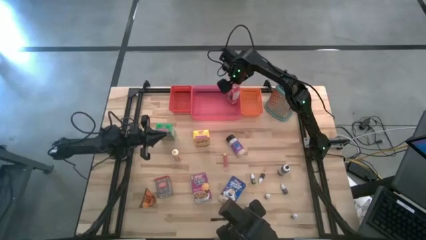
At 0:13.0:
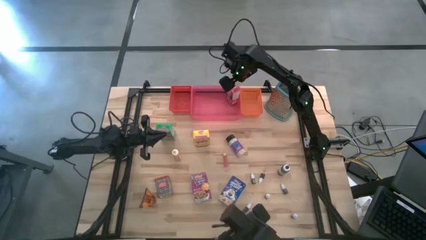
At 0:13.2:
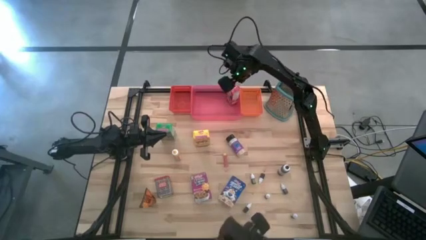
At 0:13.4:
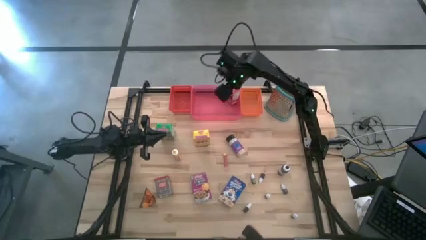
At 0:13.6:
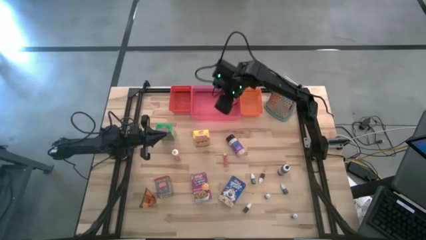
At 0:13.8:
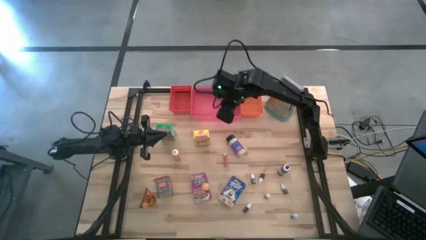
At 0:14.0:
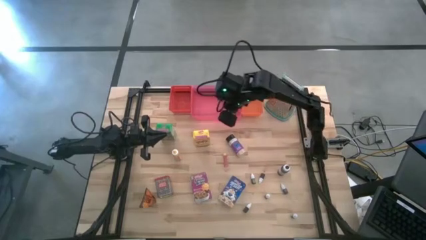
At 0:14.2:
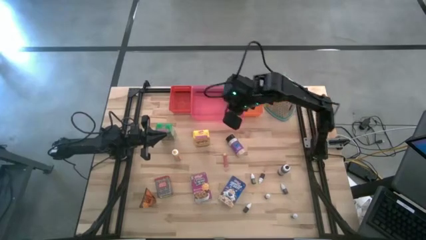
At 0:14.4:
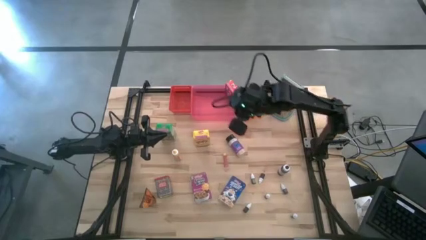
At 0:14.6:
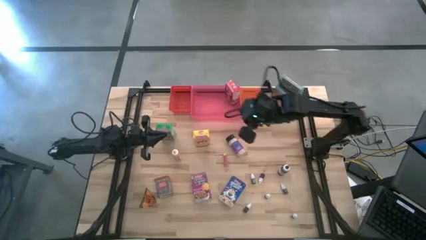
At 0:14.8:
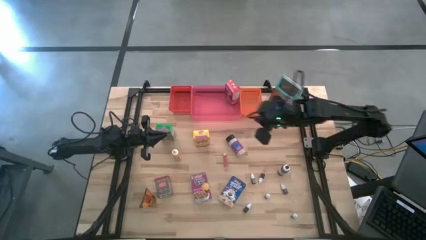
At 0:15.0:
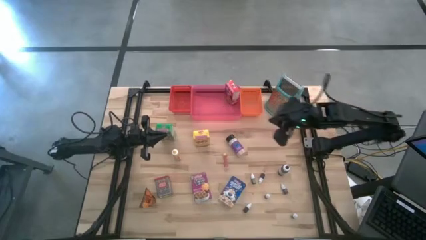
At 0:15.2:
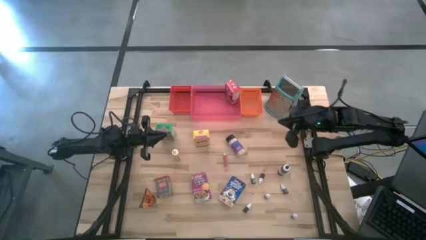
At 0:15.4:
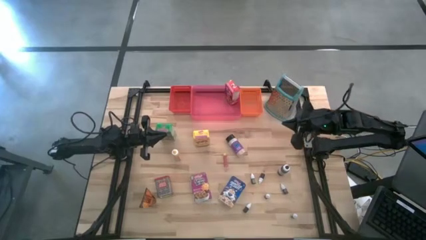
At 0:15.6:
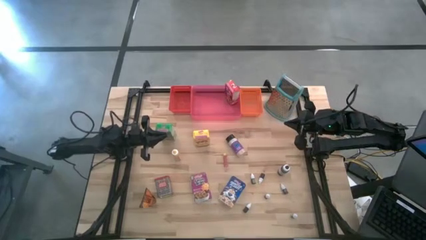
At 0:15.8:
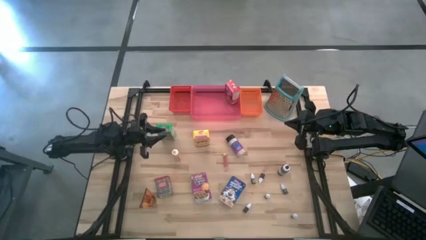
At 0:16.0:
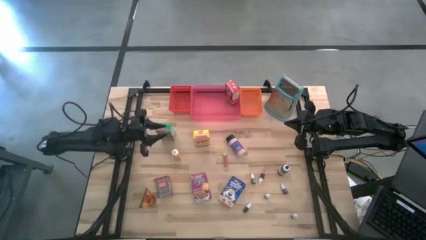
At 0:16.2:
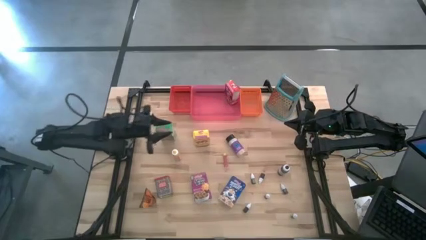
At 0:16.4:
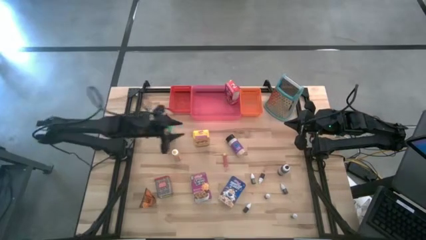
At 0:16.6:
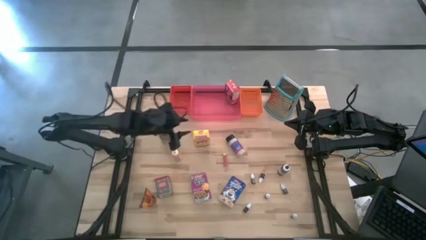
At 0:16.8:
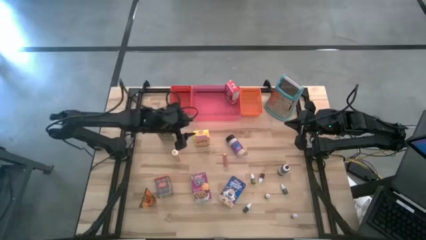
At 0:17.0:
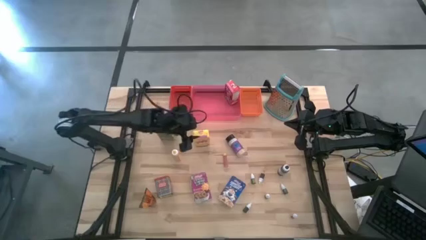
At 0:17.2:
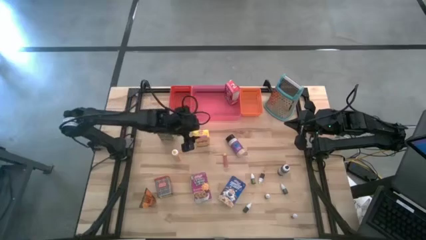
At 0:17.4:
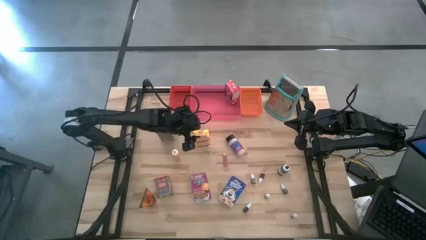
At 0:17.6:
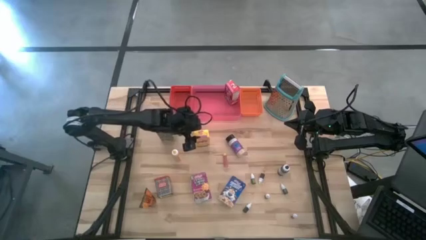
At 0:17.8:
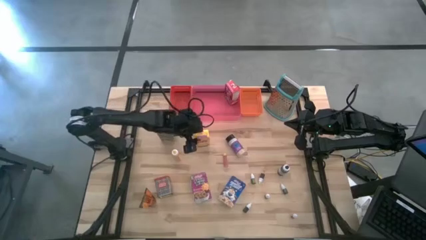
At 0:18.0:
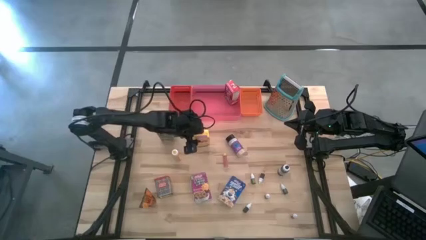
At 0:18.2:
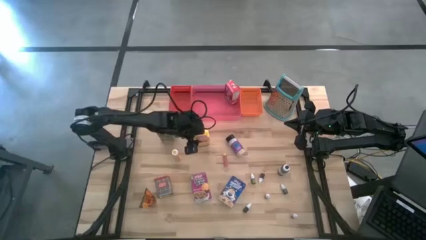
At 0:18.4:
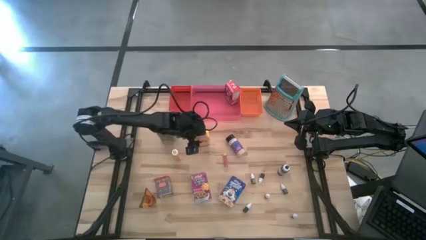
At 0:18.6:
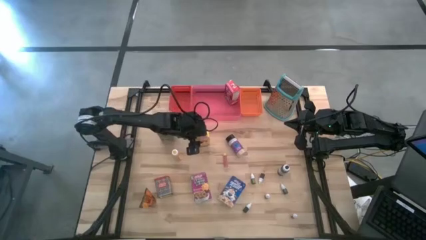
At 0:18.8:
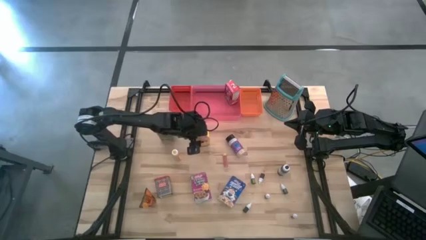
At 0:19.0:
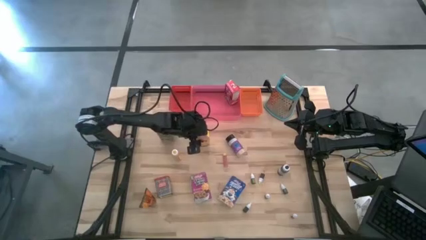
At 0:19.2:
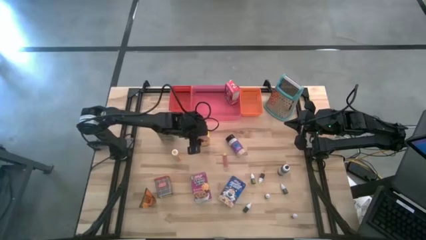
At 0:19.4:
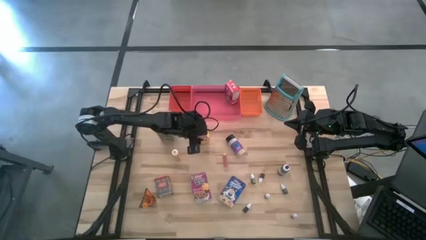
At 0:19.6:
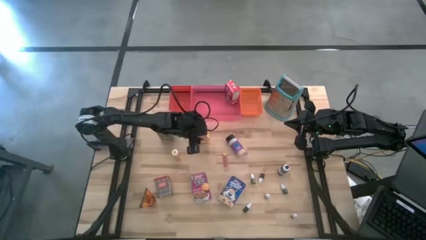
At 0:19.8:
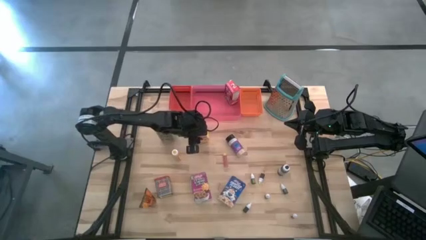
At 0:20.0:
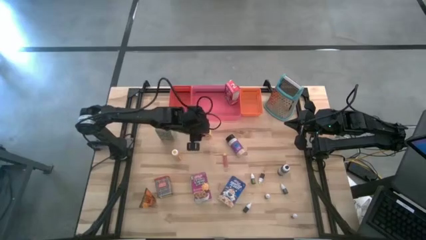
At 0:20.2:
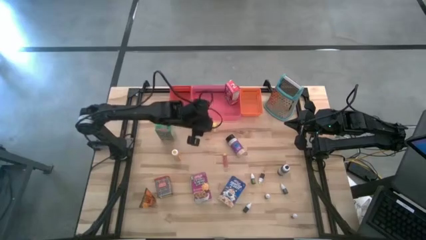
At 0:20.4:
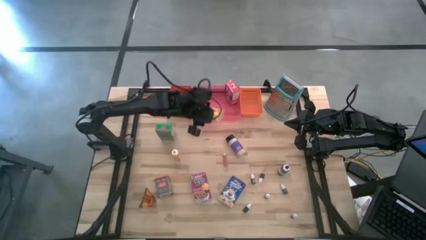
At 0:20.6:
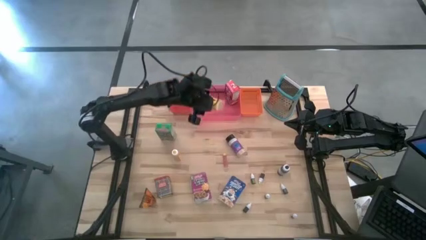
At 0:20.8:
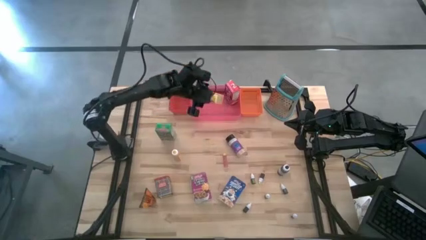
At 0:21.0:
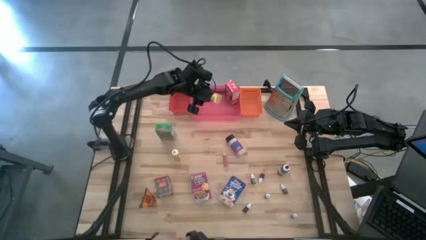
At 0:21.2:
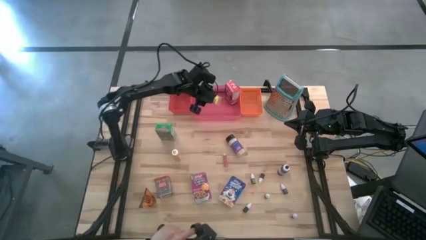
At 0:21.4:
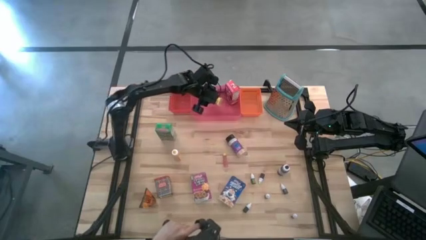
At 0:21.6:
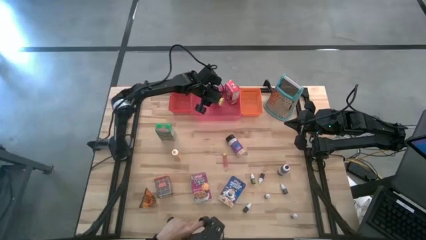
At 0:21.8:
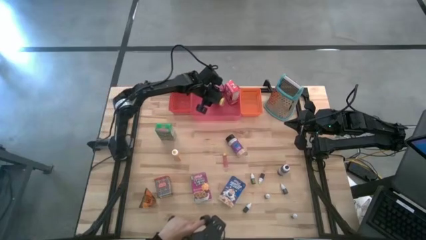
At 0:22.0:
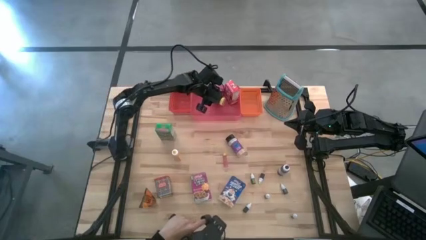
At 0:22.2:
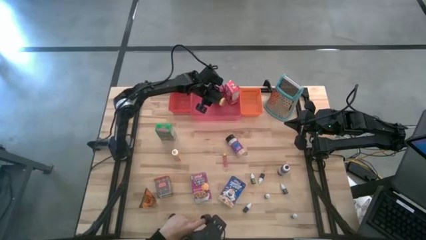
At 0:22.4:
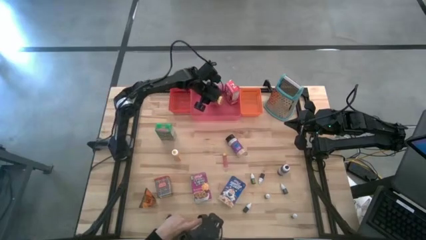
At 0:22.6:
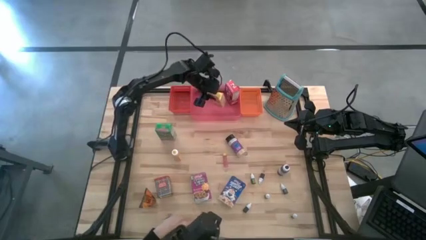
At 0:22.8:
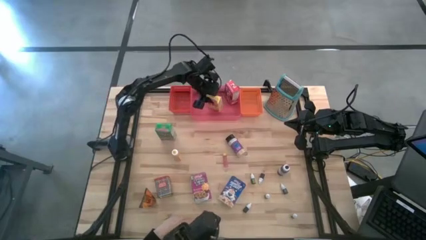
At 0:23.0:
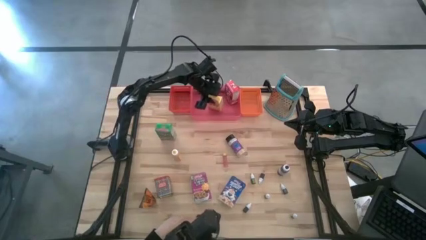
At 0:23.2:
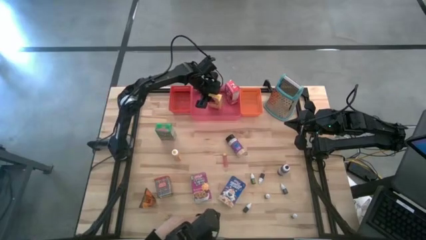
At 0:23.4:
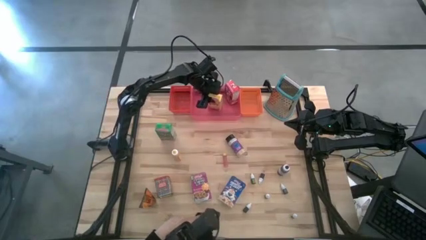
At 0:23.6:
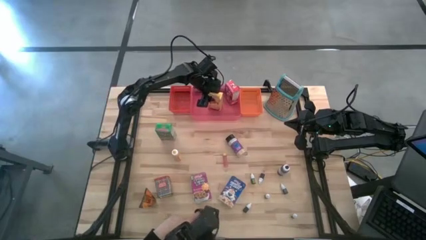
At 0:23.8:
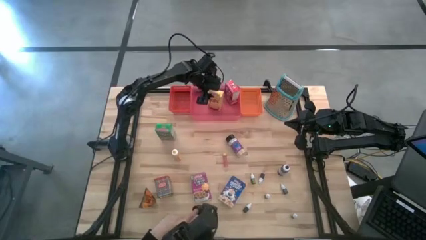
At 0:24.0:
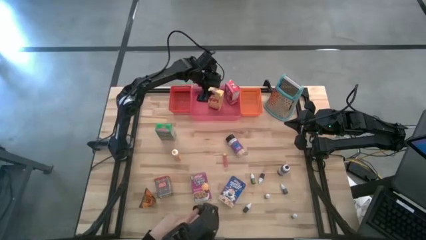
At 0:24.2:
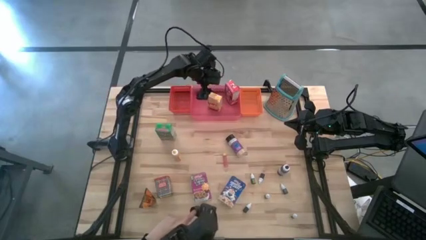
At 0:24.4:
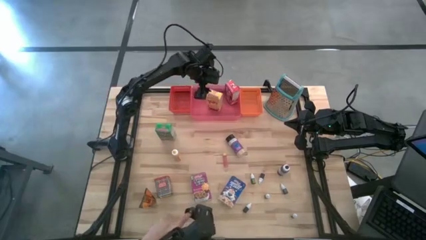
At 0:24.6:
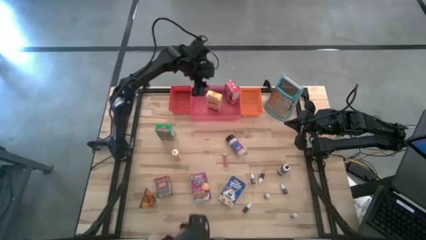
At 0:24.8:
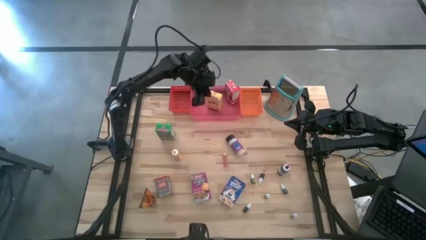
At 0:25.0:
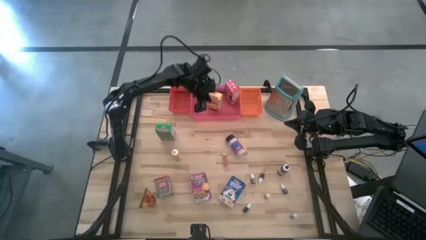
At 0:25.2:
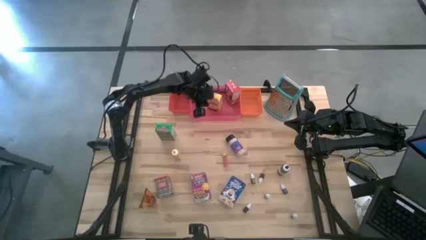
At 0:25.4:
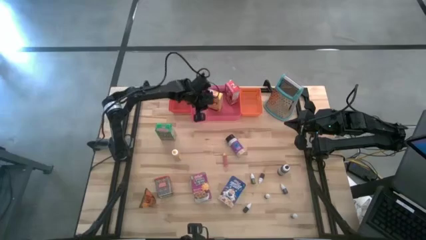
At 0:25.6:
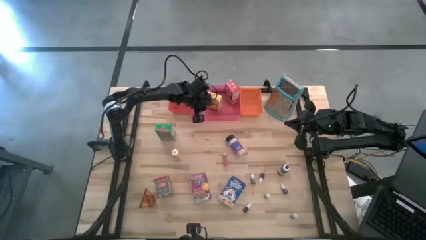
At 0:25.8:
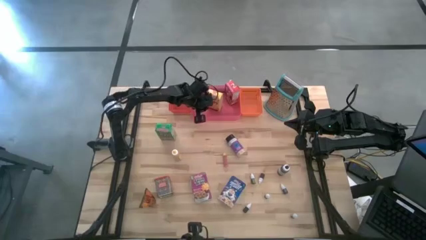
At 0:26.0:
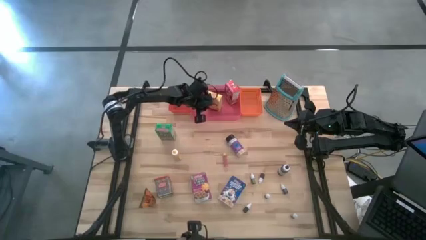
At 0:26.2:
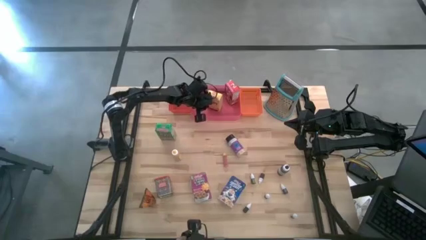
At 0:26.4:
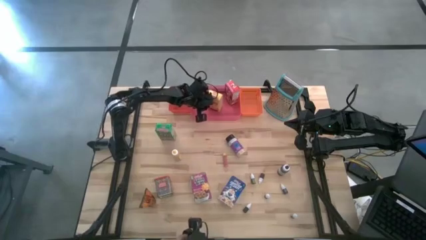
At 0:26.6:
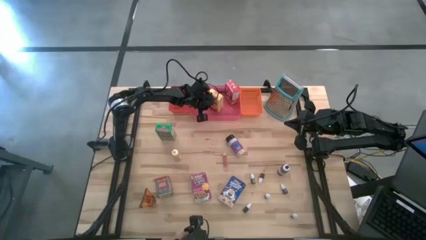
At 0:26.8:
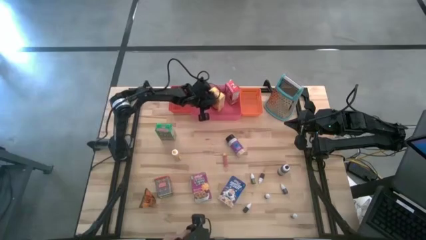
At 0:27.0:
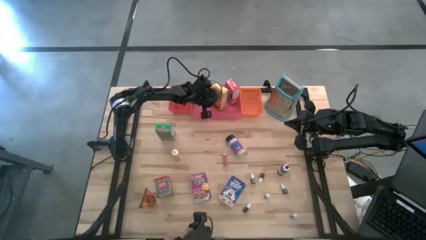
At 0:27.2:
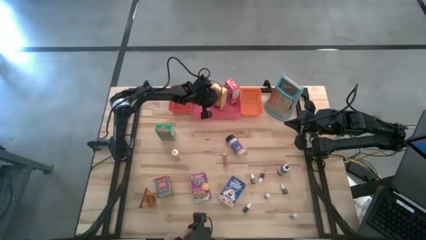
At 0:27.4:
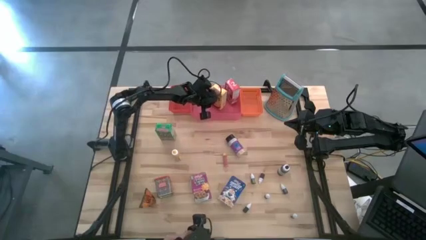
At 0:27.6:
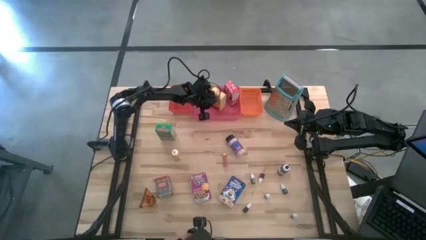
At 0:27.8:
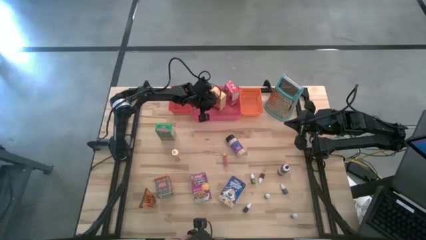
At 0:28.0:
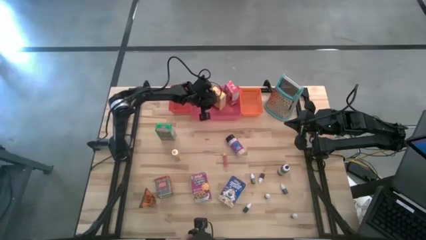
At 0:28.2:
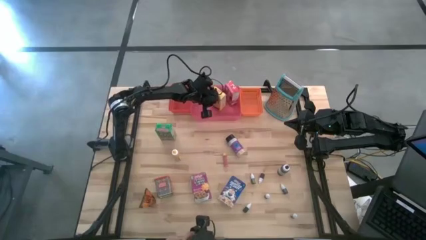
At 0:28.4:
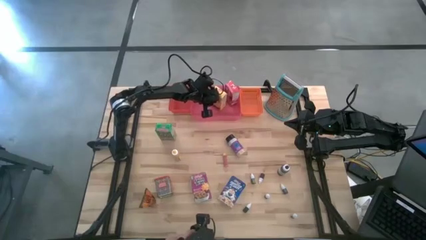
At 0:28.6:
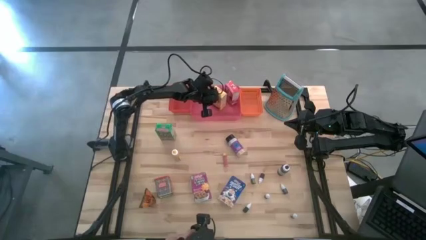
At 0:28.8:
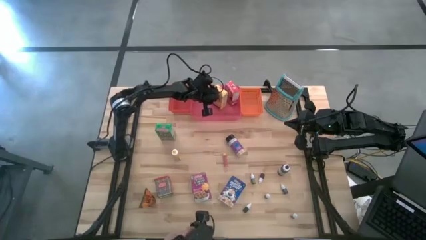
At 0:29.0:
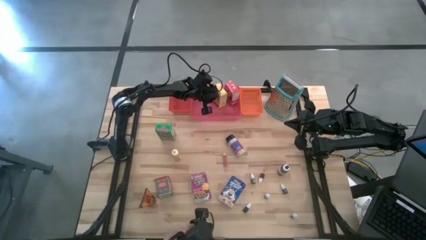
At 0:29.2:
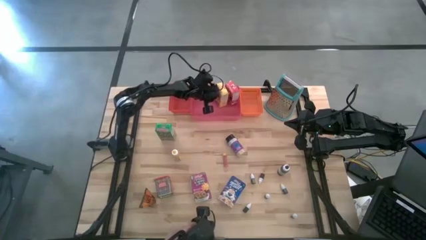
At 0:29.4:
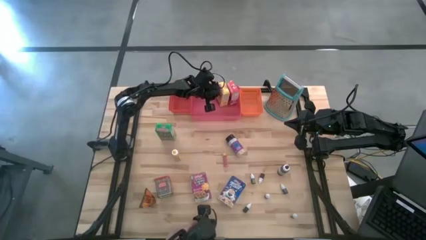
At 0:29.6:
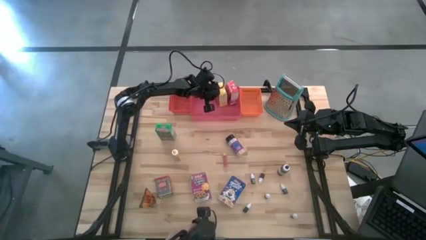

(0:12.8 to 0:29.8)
Task: Pick & Place Kitchen Items
Put the yellow cereal box into the pink bin
